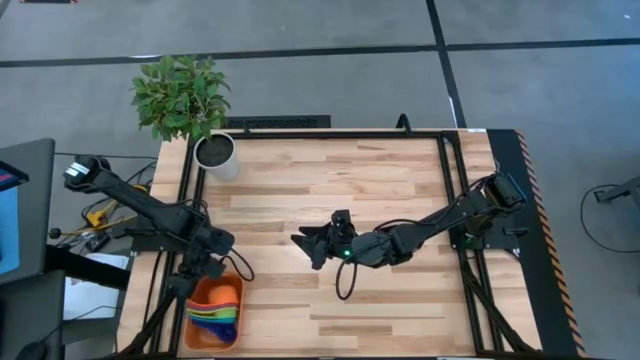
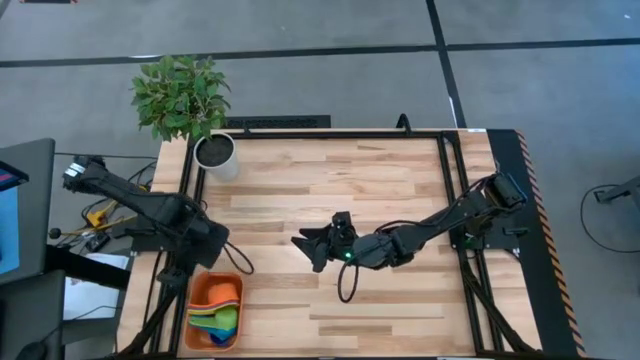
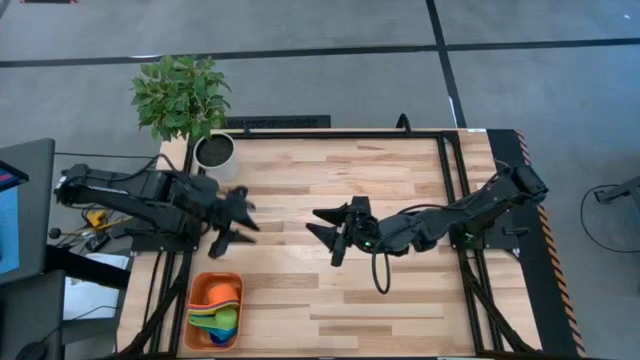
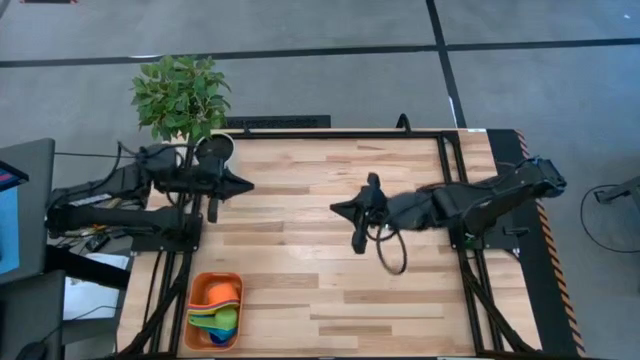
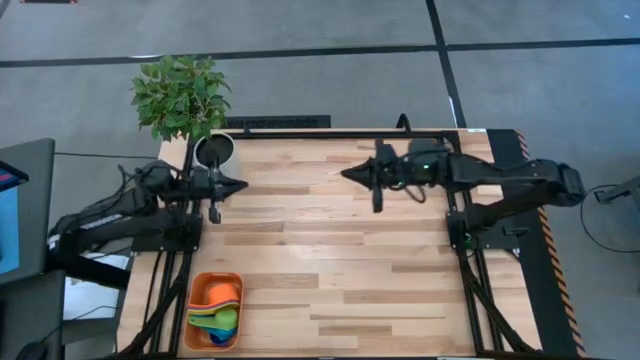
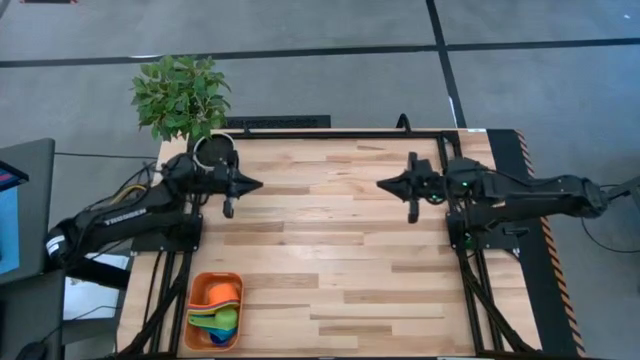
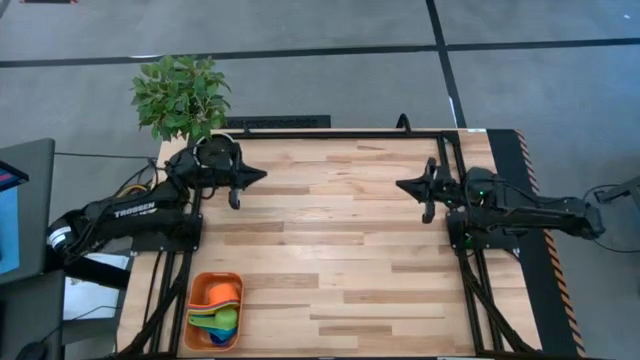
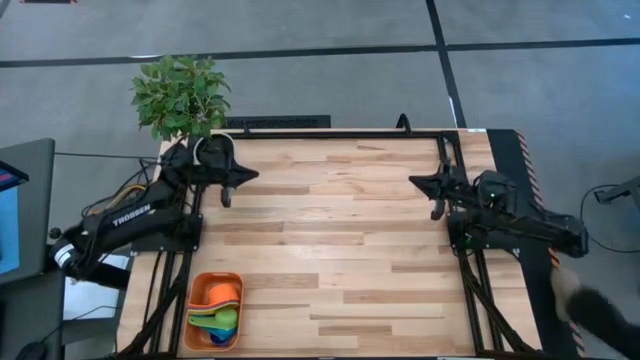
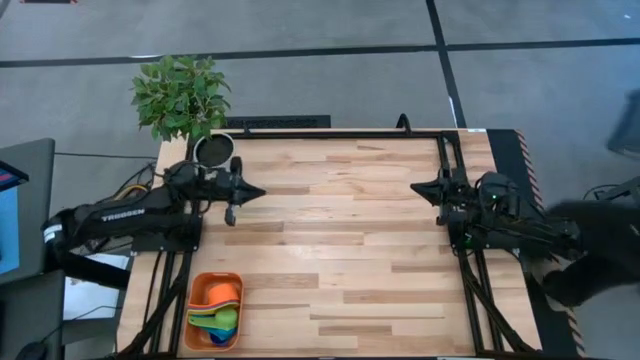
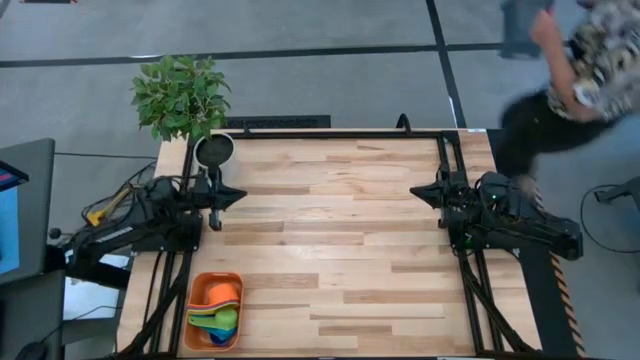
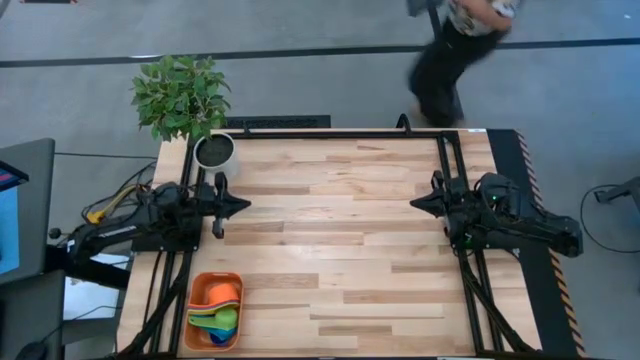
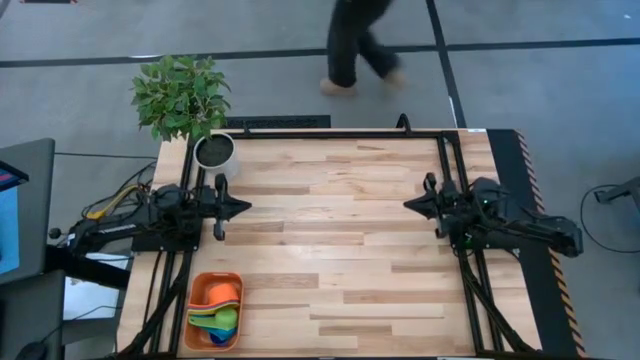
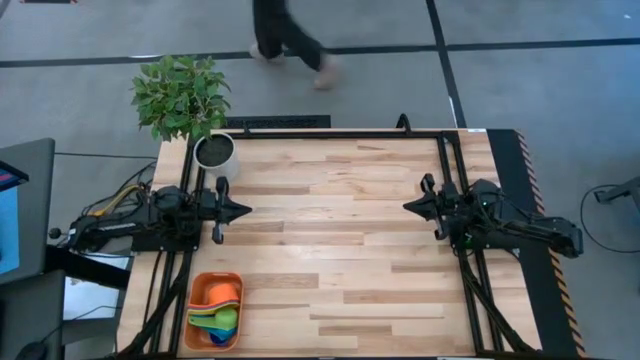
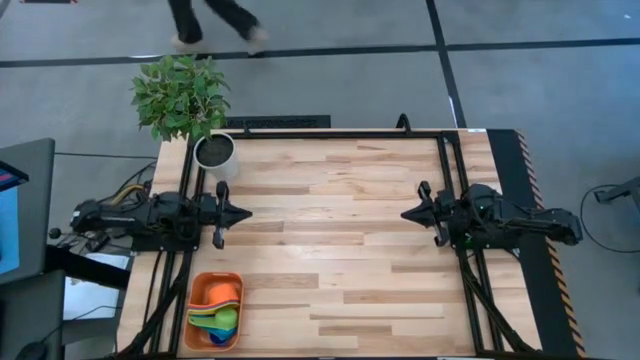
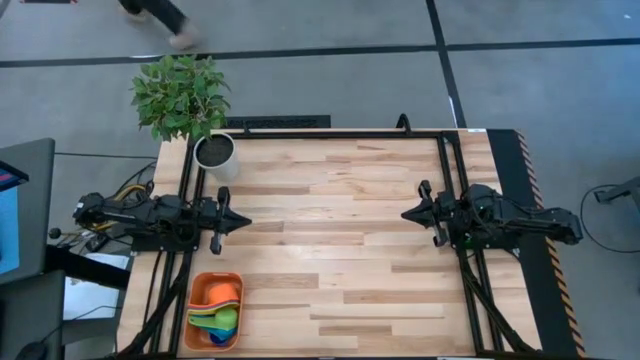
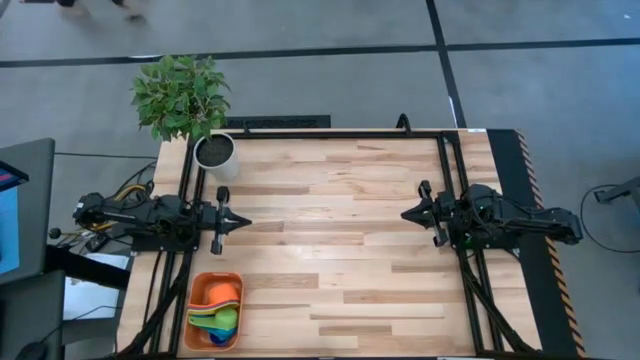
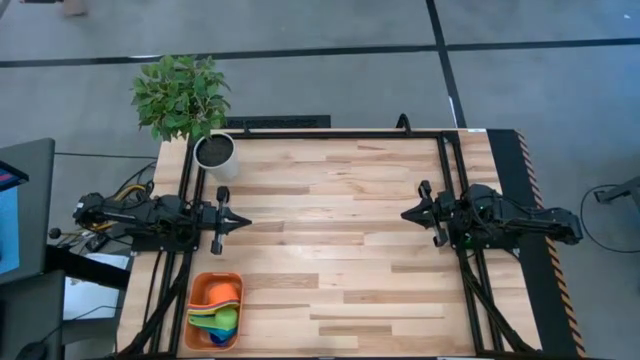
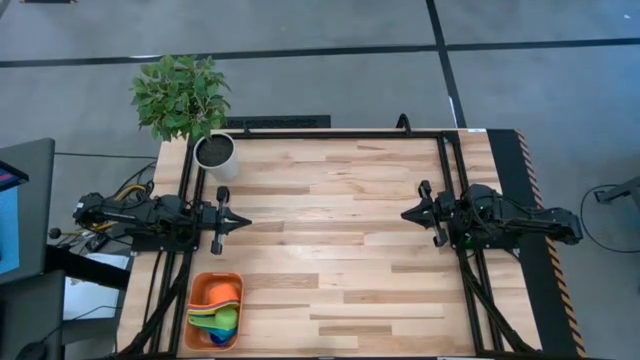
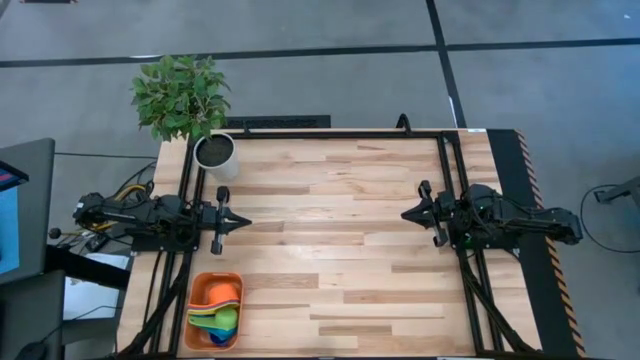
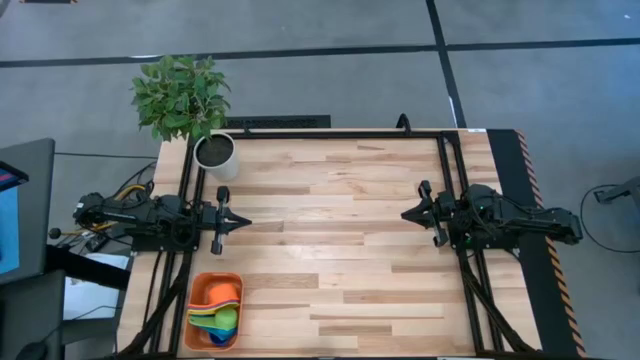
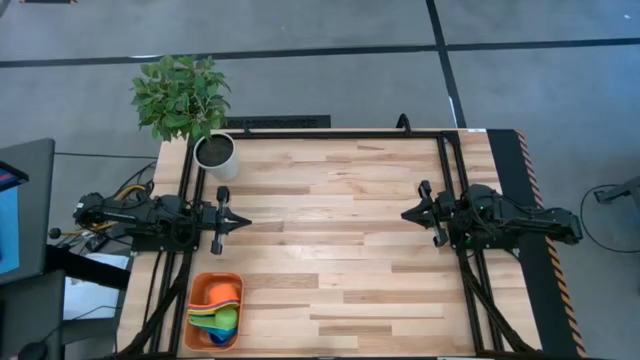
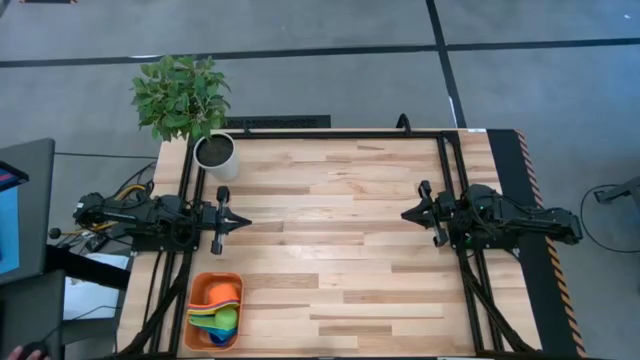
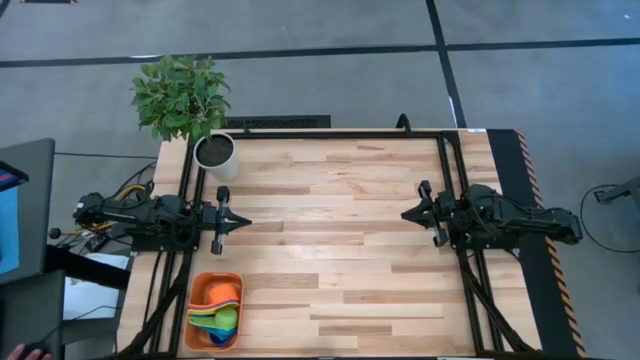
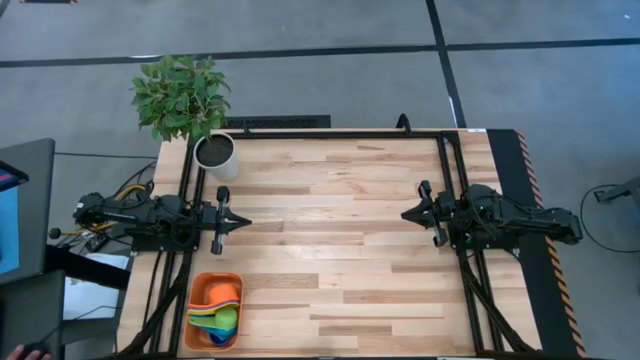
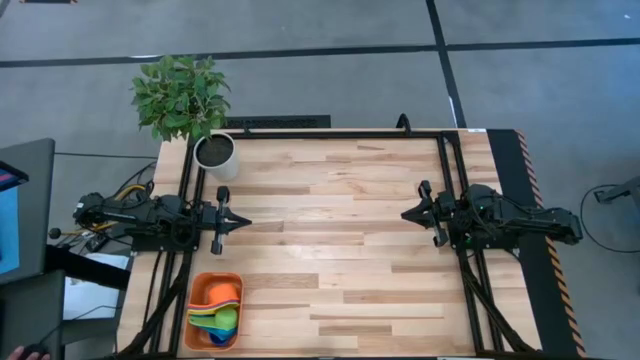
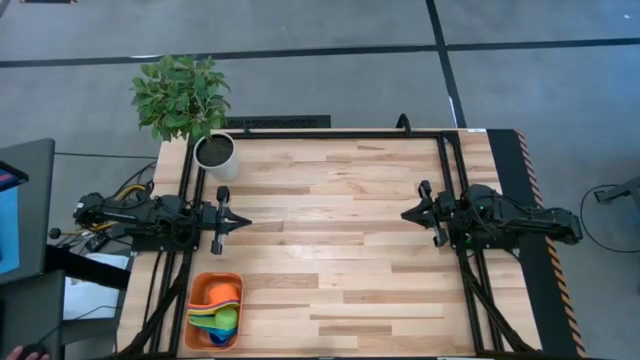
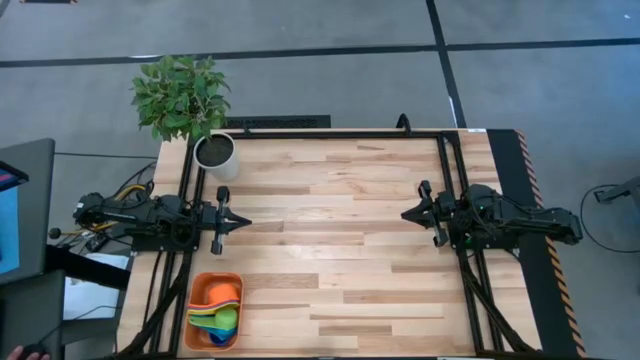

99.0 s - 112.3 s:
Task: Nest measuring cups in basket
Return to Home Position

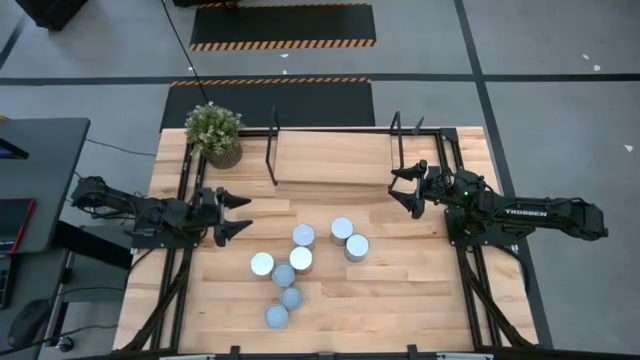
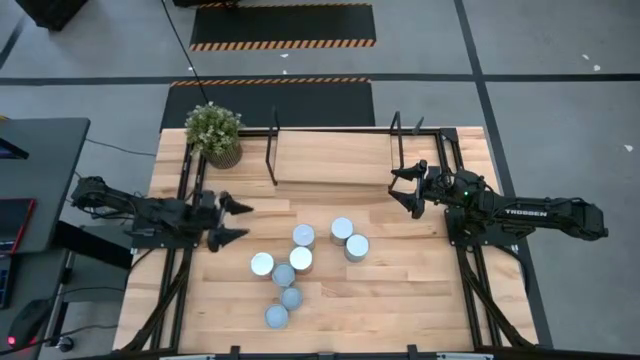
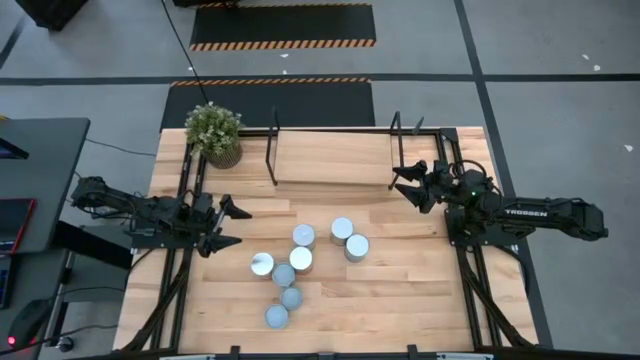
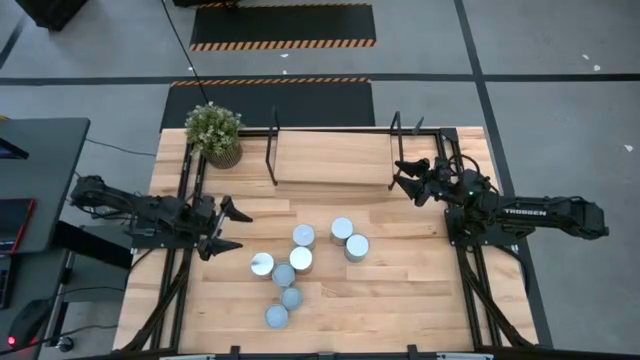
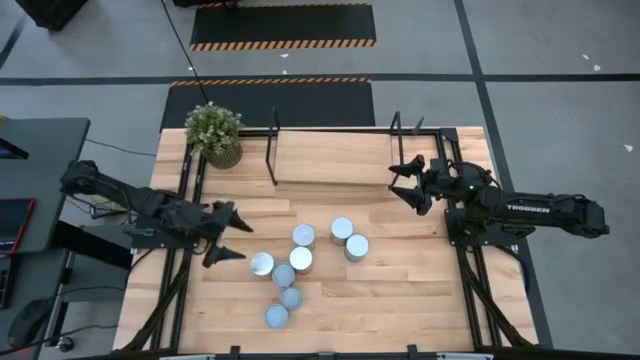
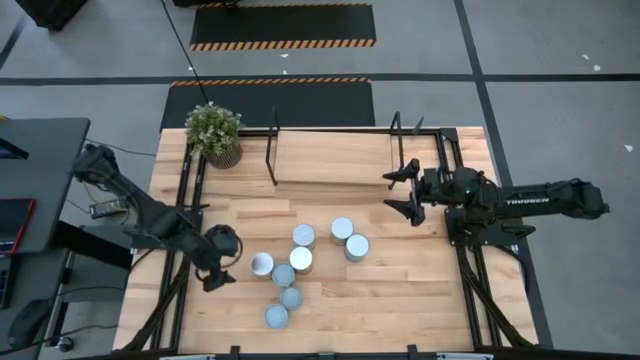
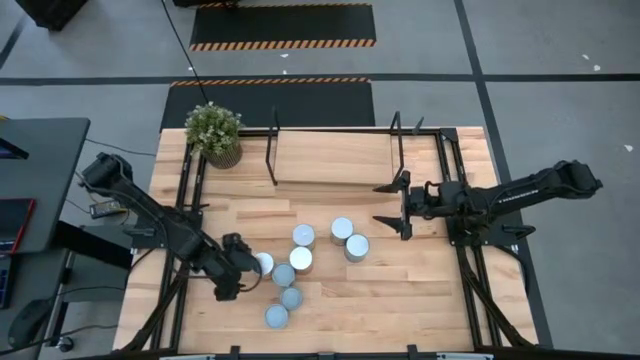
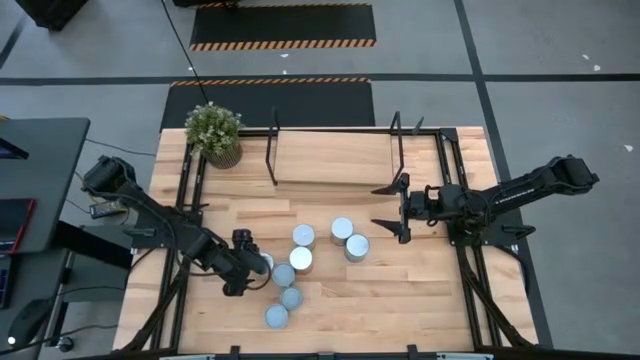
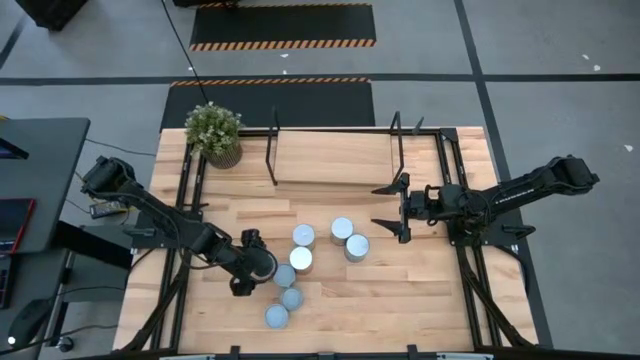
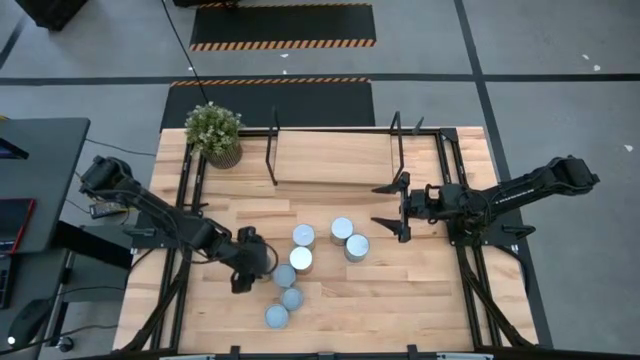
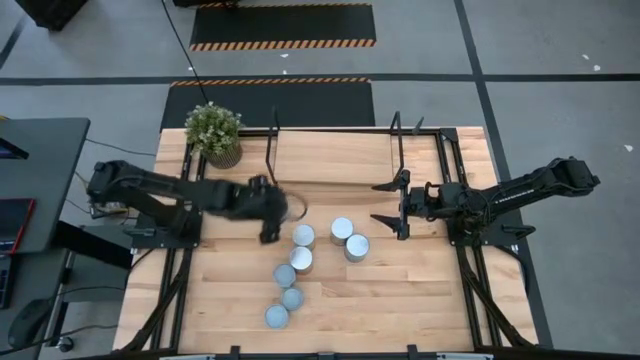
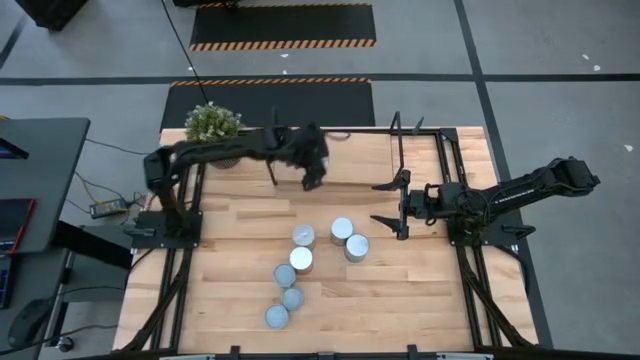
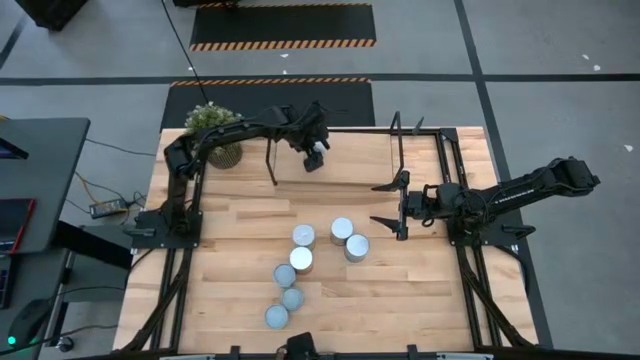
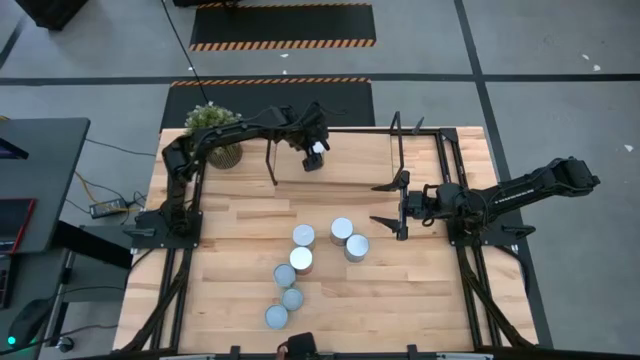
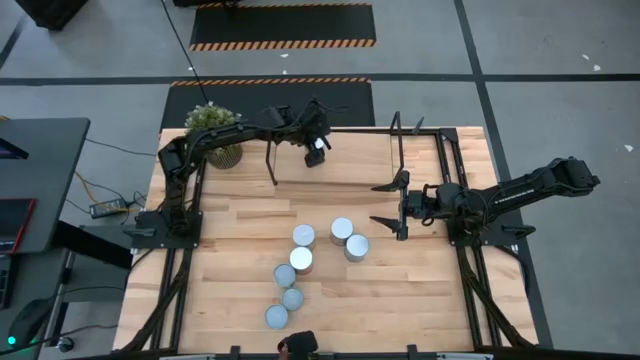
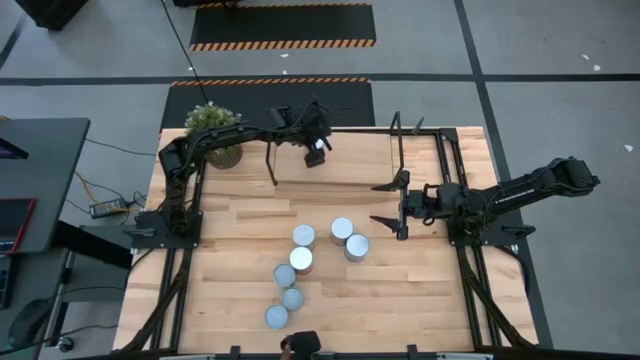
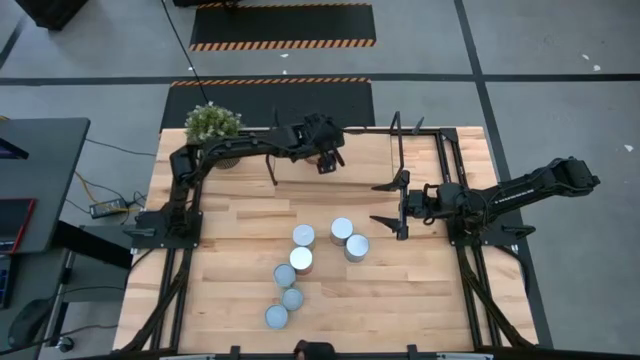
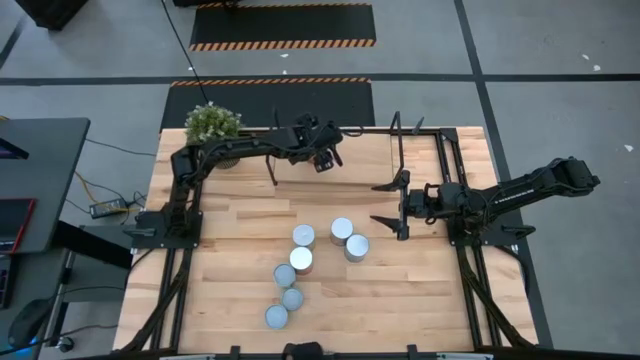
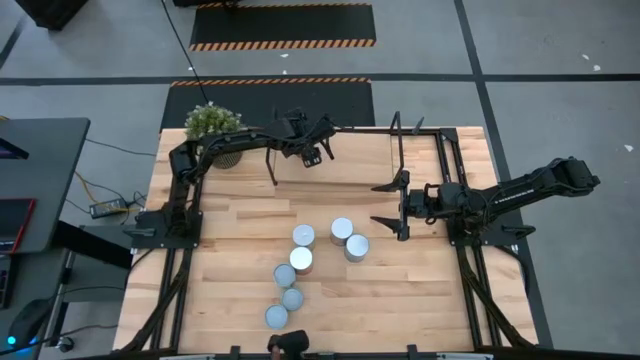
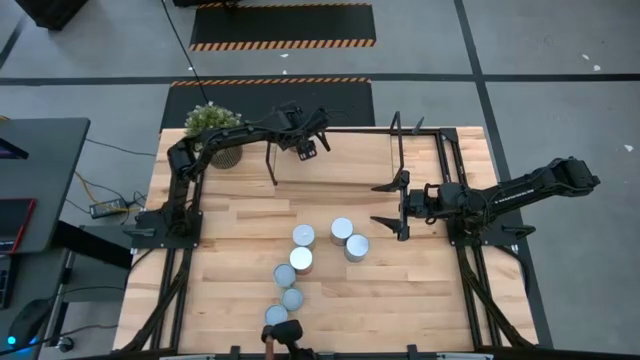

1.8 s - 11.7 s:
Task: Pick and place cans onto a shelf
Put the canned corn on the shelf
